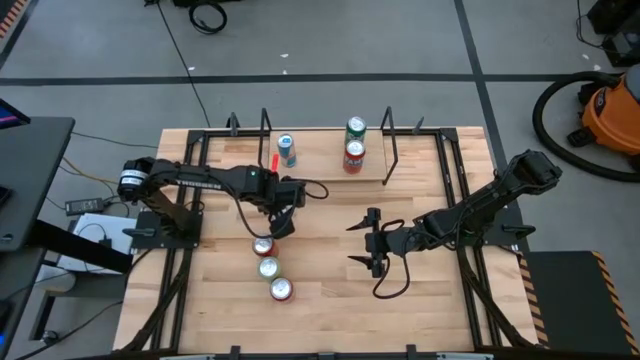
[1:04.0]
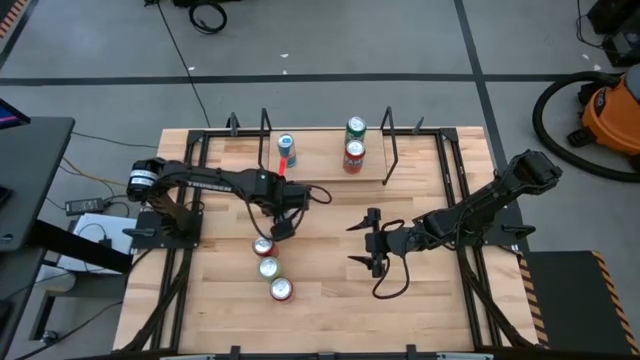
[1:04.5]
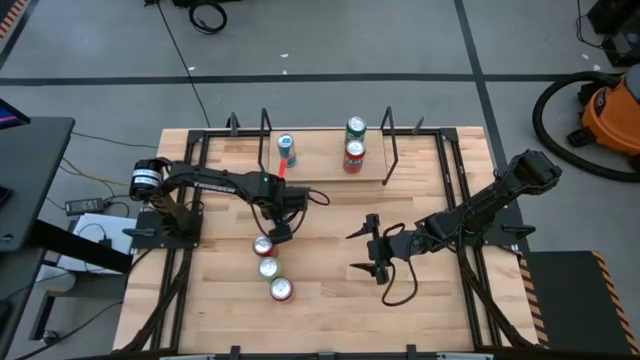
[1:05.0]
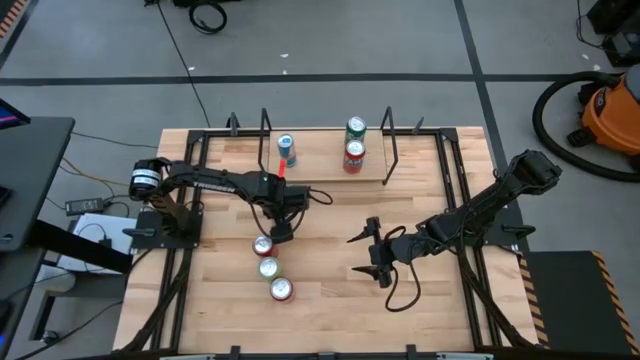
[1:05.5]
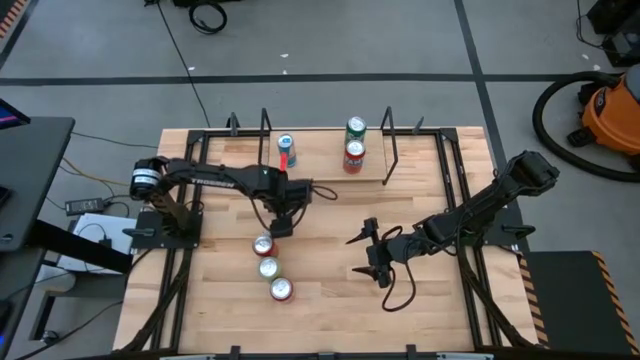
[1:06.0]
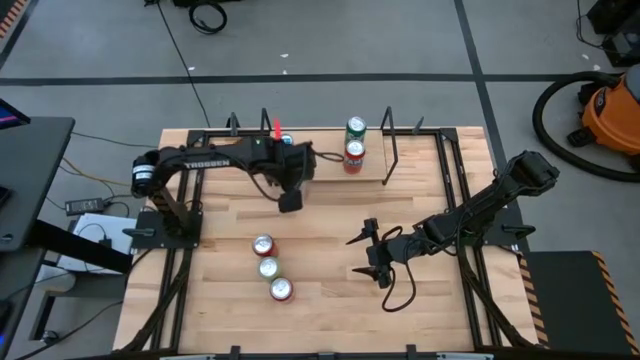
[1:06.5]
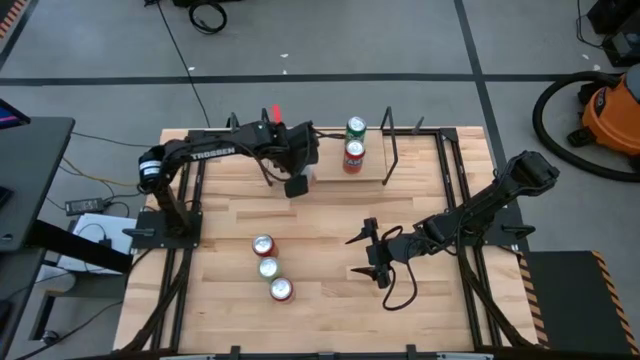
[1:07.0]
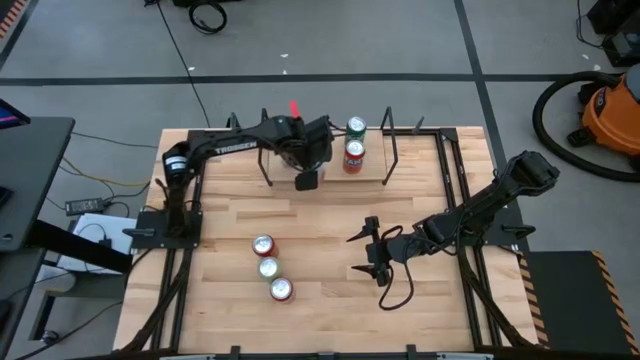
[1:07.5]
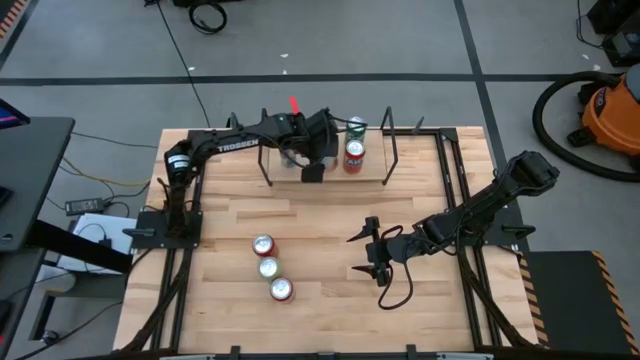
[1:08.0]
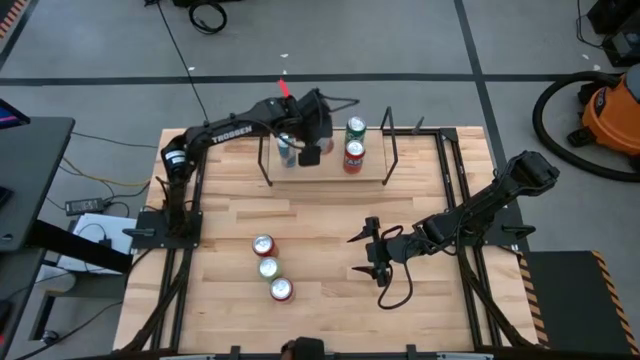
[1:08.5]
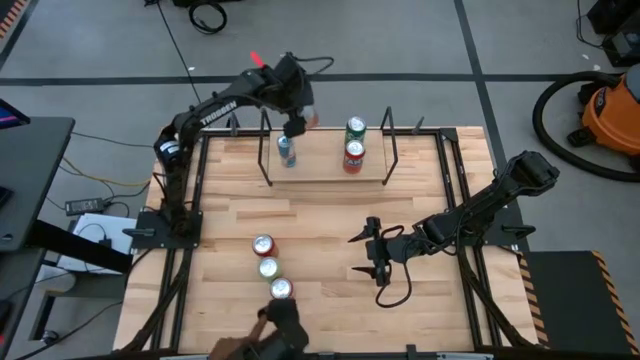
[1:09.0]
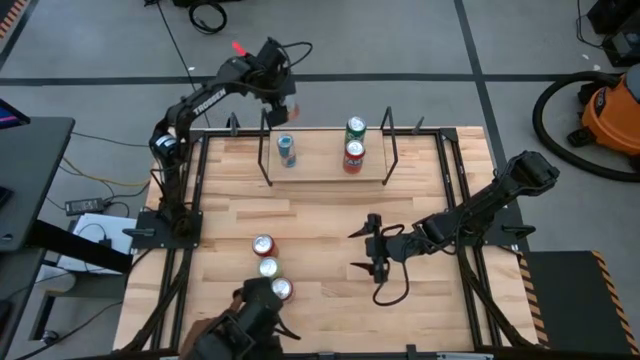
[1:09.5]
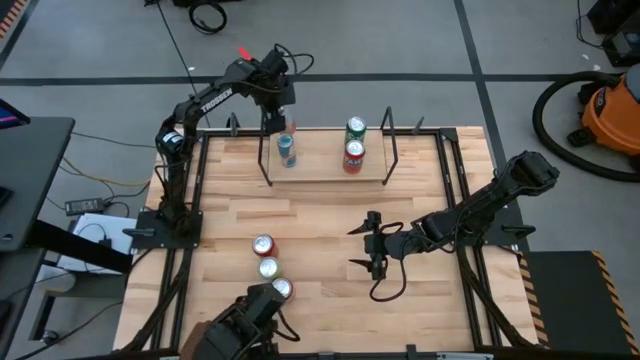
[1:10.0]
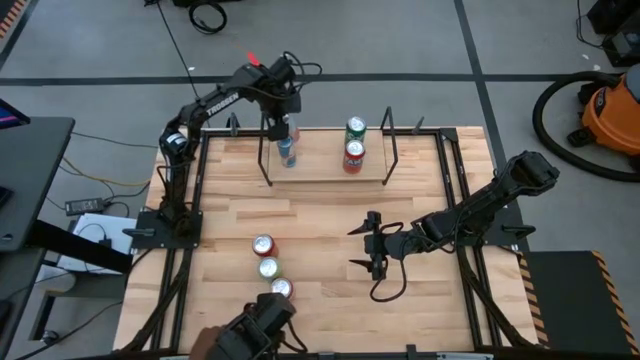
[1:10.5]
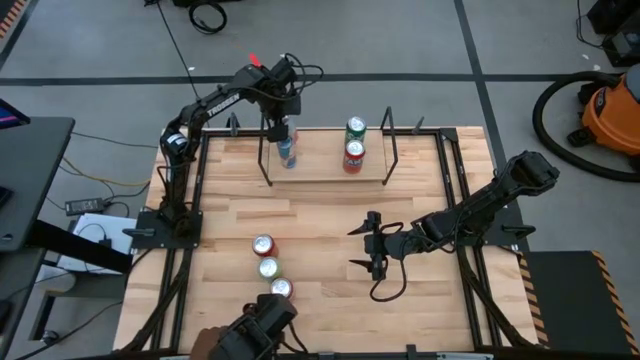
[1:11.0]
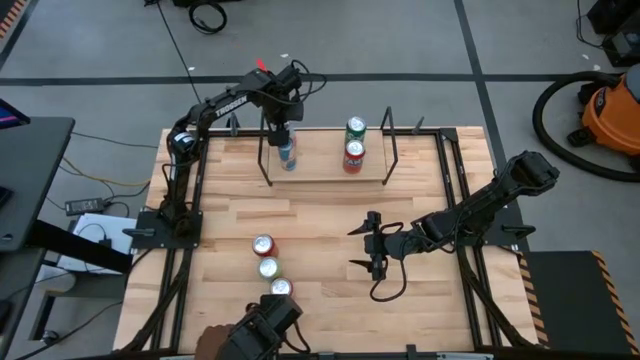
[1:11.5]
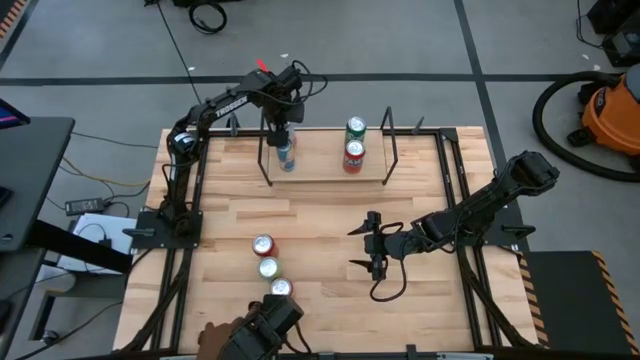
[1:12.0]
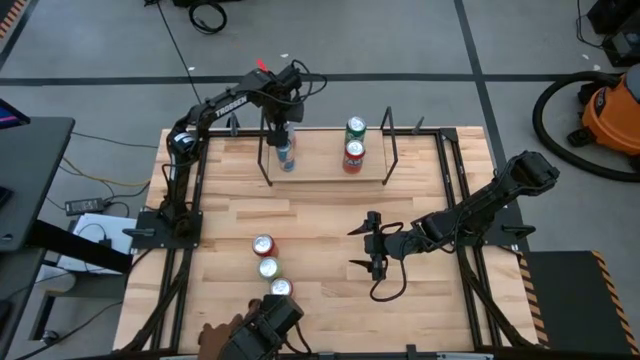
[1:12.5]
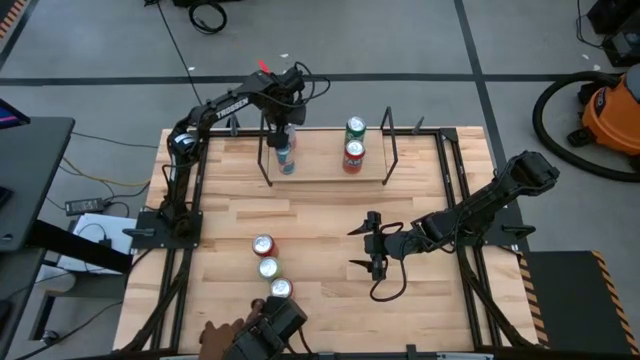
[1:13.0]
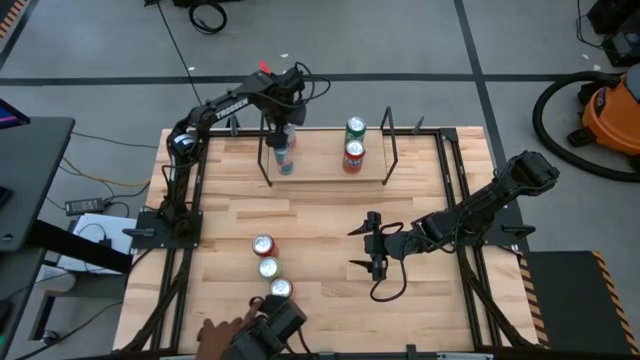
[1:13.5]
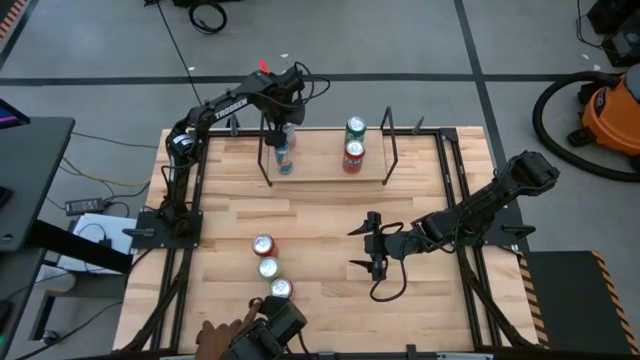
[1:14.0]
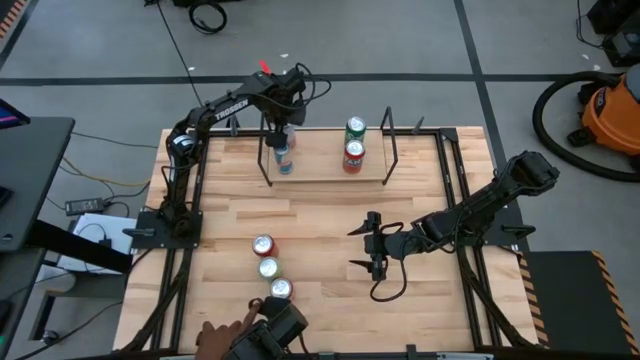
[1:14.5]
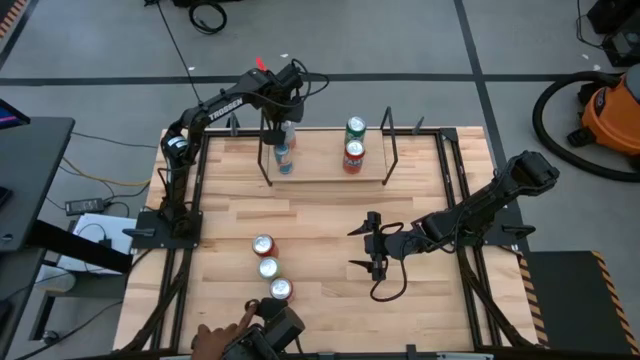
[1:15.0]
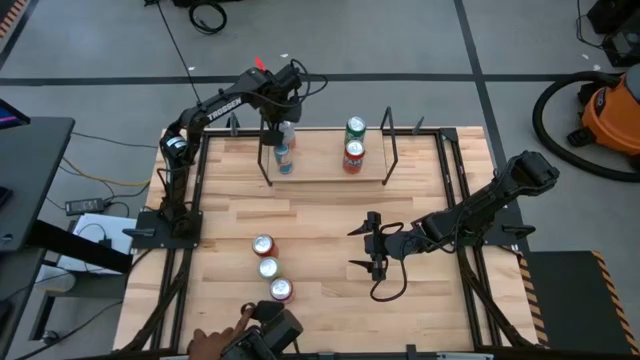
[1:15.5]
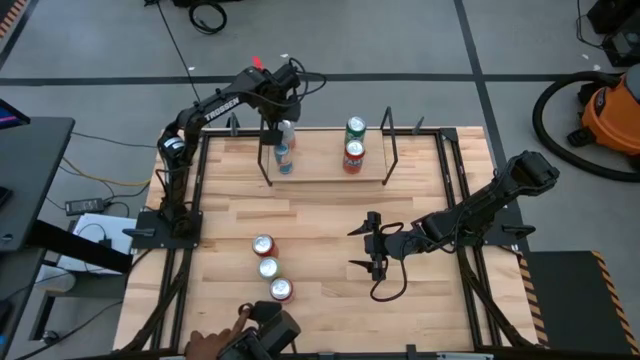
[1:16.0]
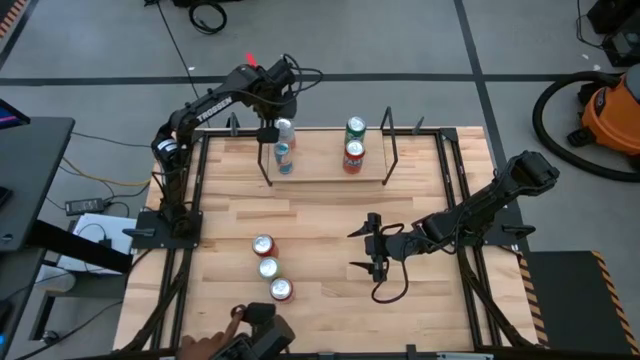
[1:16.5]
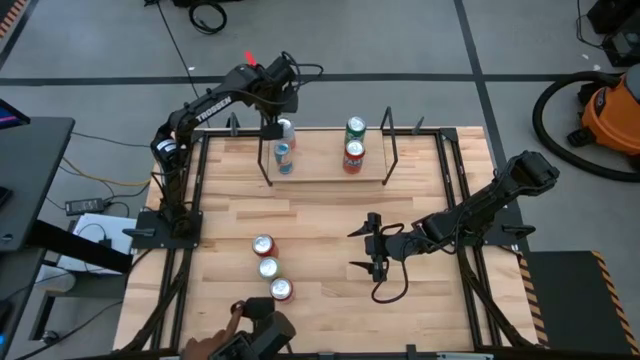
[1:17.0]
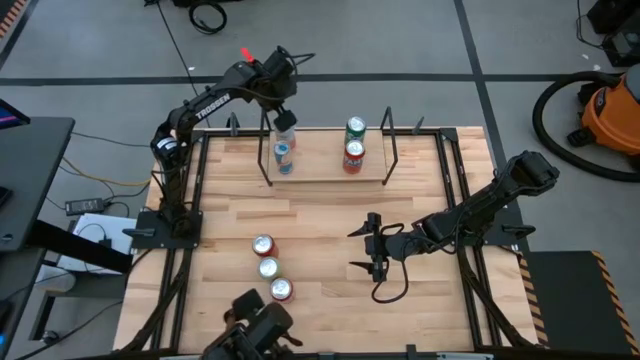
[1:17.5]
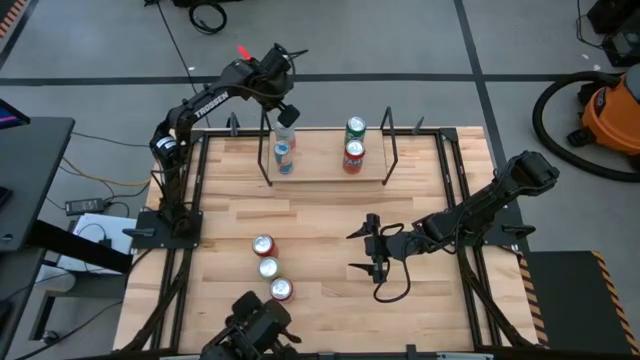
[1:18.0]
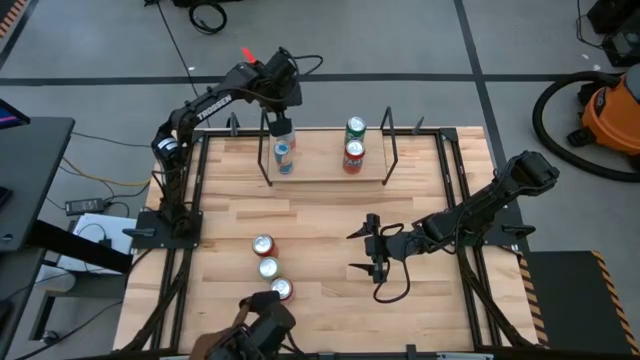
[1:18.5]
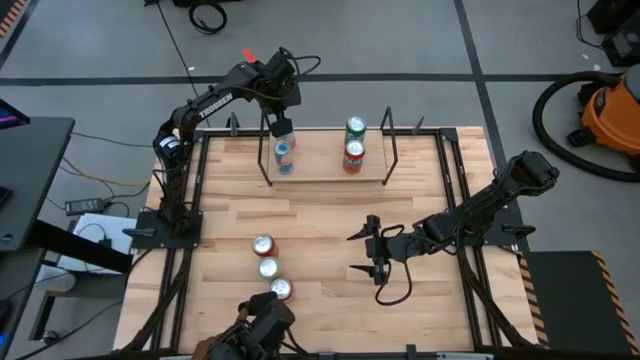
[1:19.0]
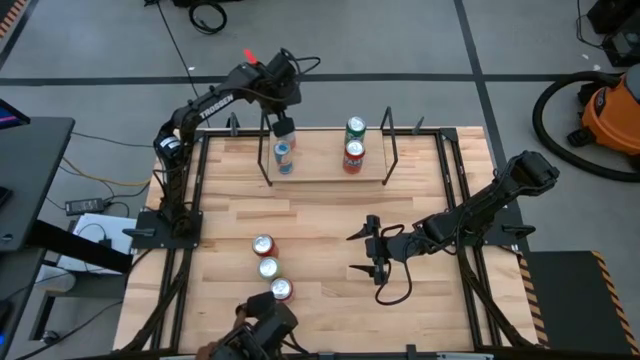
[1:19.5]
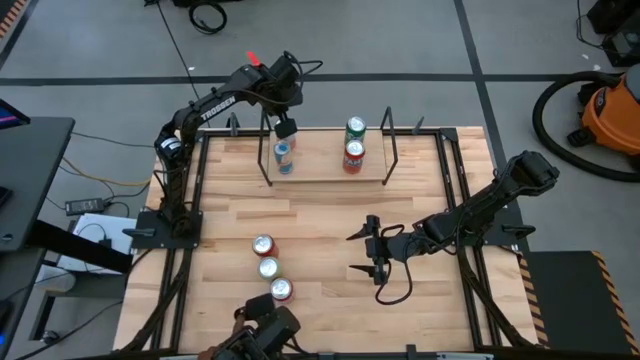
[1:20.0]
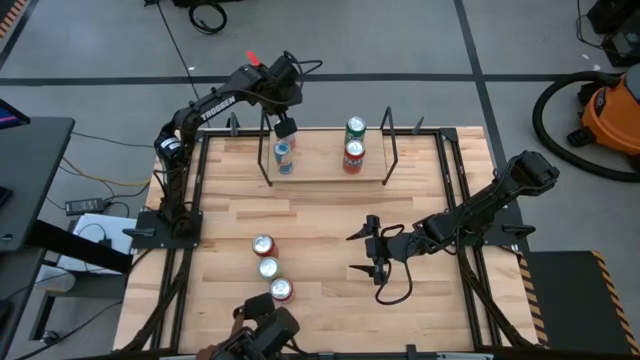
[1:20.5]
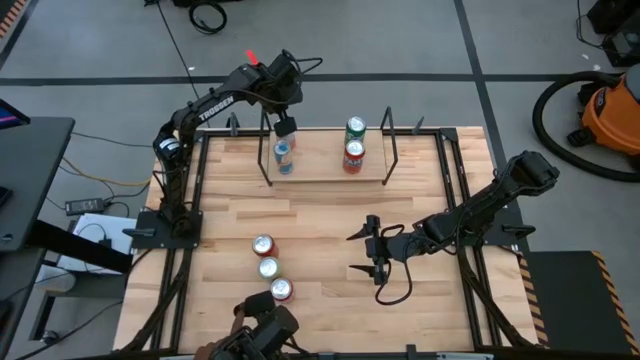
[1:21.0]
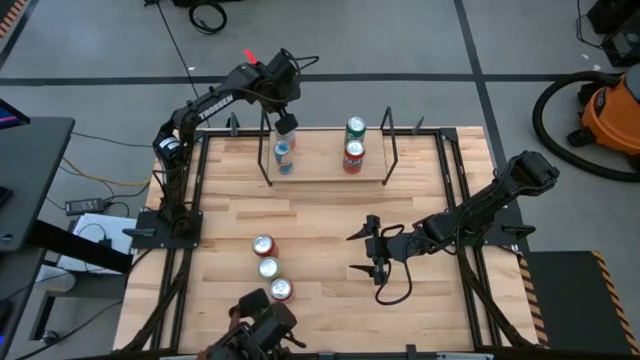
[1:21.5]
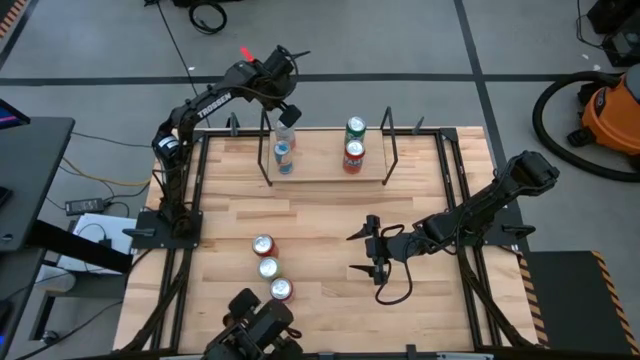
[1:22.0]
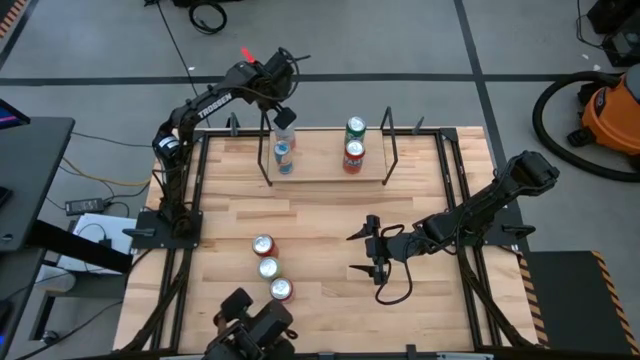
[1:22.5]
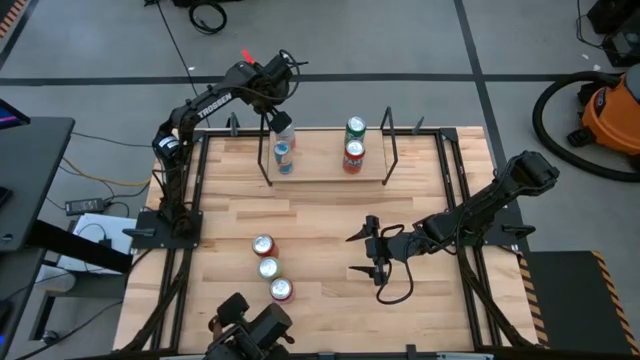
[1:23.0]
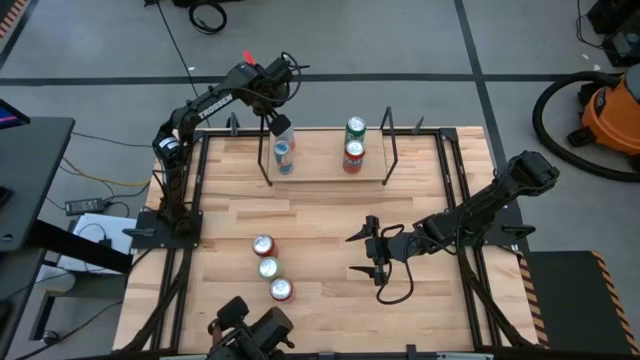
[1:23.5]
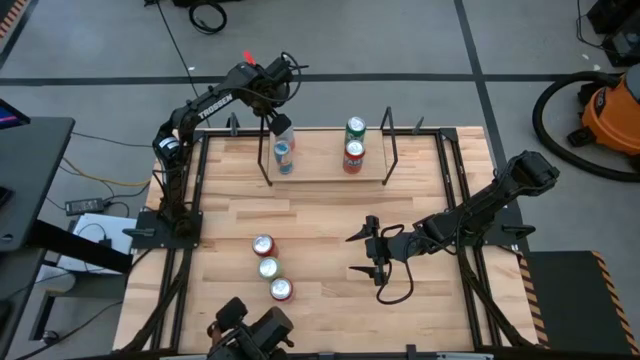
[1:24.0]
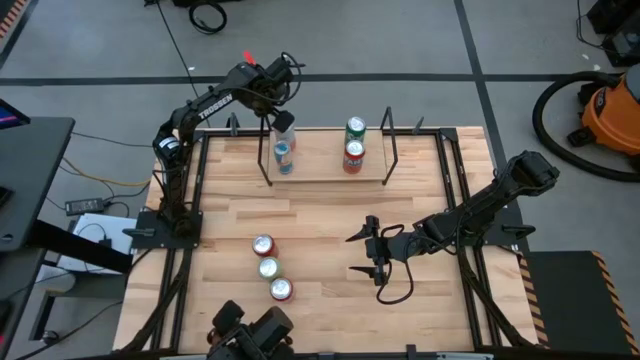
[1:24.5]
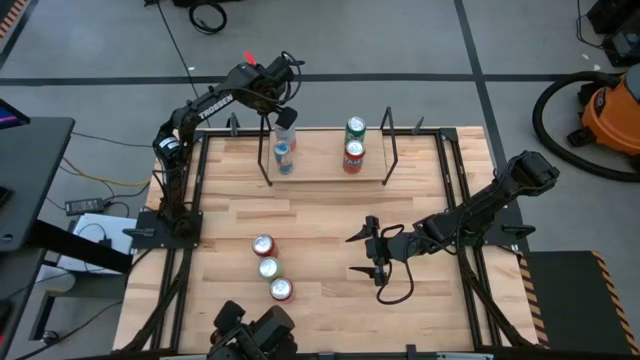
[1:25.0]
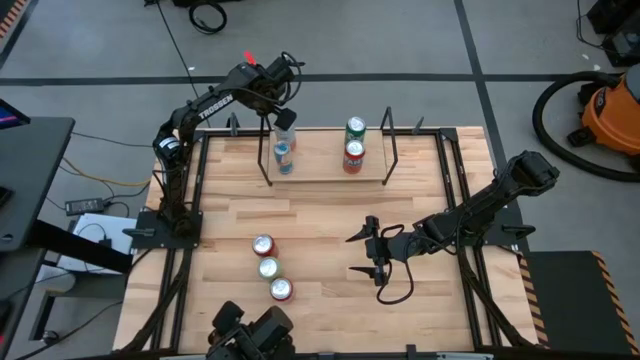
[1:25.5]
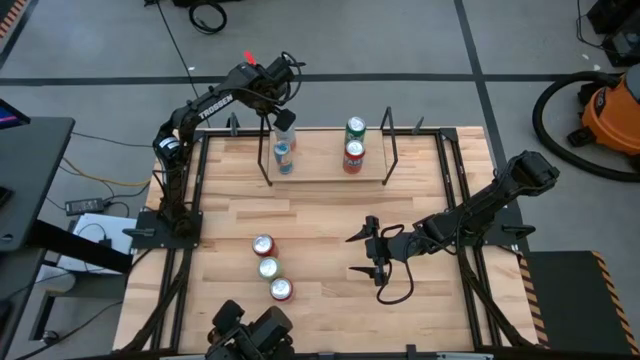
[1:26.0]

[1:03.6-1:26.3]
Task: Place canned beverage on shelf
Put the white-orange soda can on the shelf
